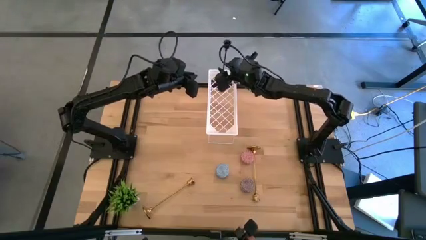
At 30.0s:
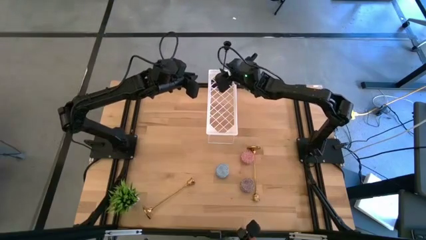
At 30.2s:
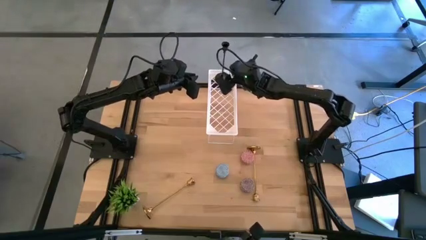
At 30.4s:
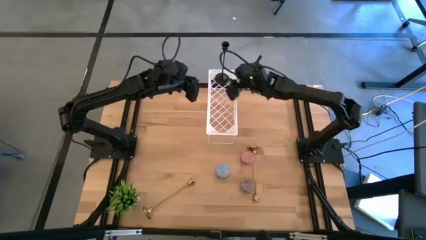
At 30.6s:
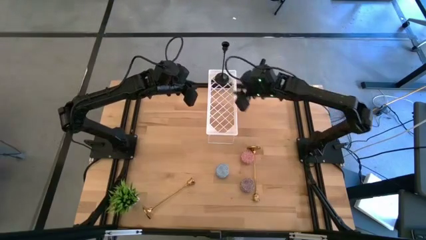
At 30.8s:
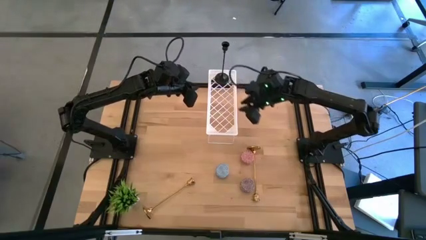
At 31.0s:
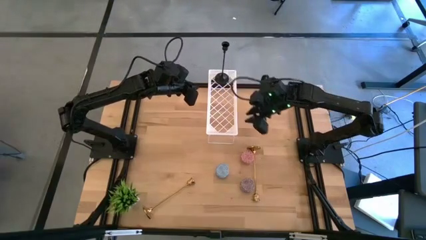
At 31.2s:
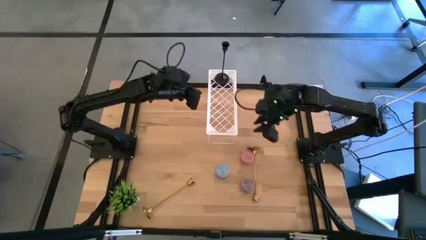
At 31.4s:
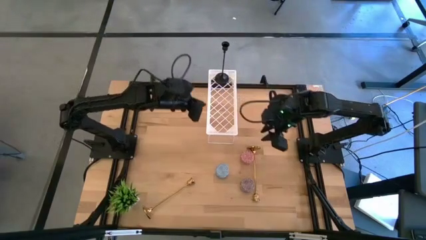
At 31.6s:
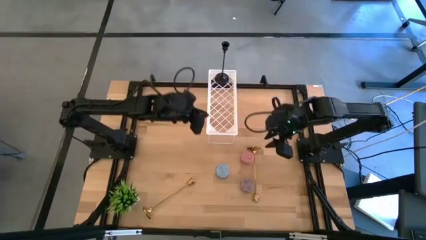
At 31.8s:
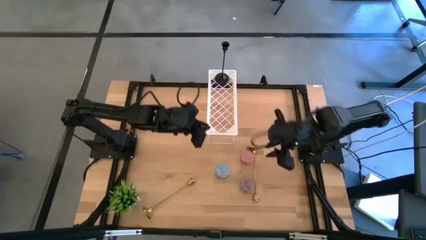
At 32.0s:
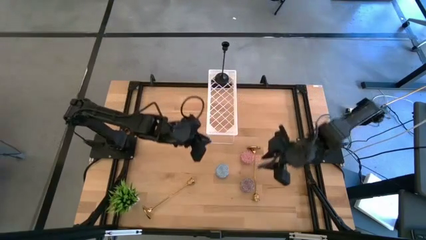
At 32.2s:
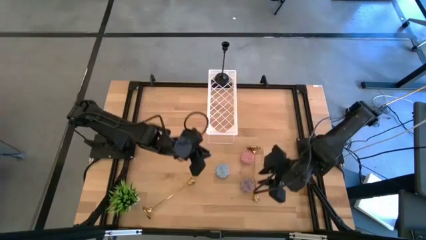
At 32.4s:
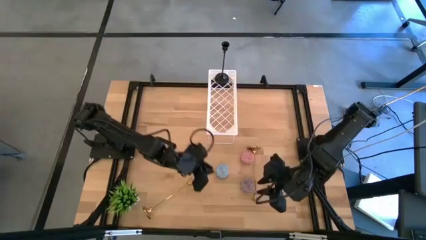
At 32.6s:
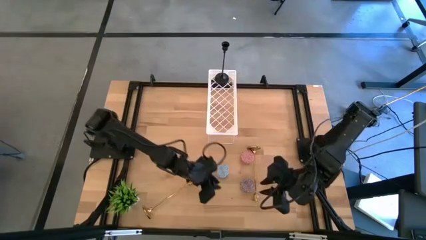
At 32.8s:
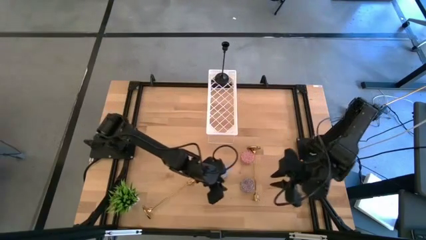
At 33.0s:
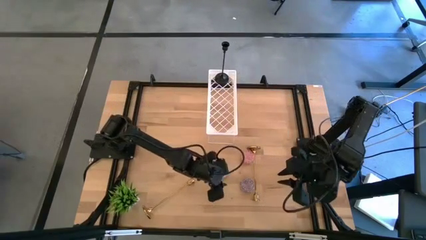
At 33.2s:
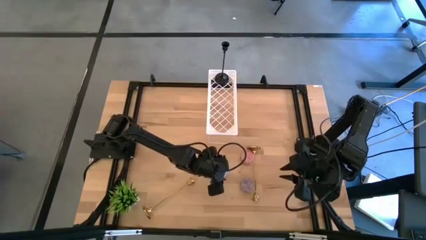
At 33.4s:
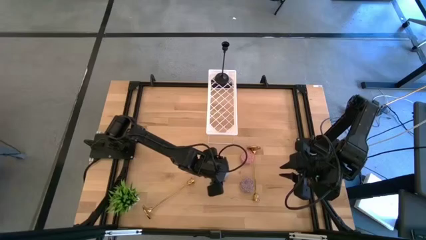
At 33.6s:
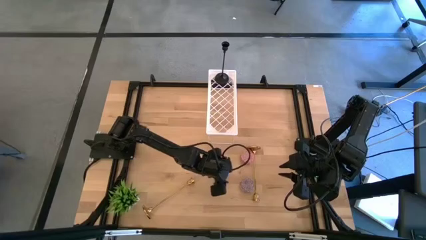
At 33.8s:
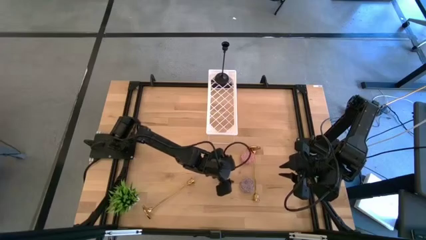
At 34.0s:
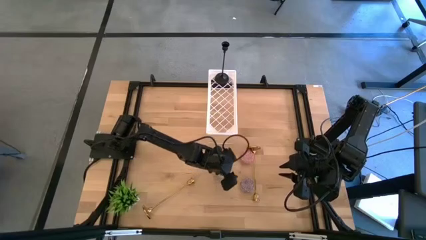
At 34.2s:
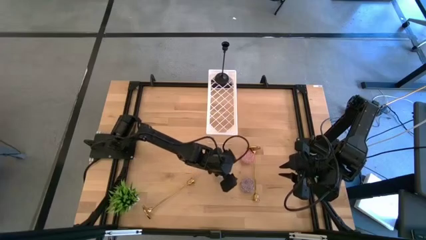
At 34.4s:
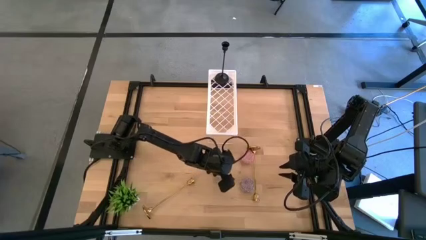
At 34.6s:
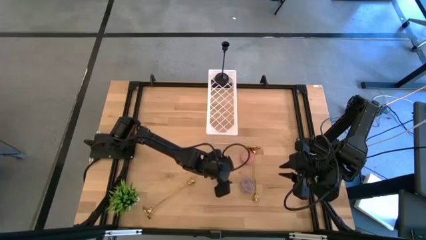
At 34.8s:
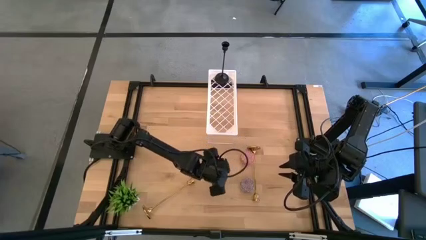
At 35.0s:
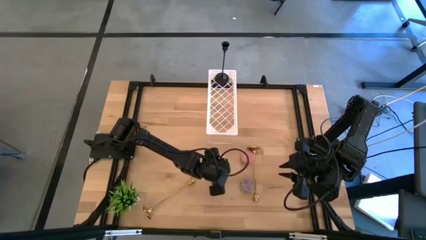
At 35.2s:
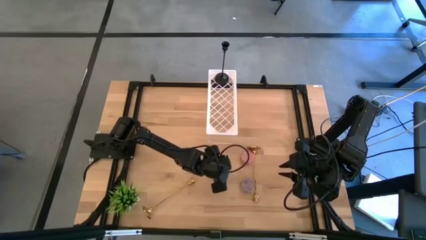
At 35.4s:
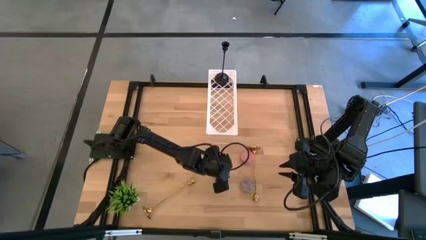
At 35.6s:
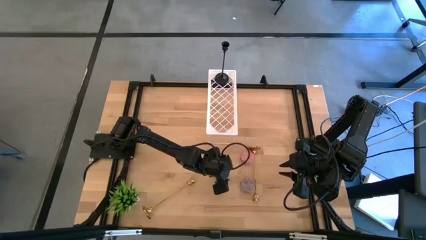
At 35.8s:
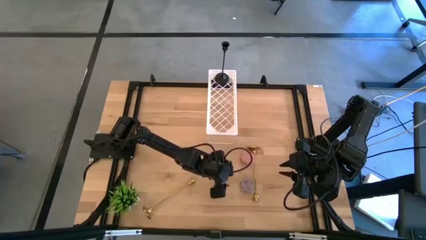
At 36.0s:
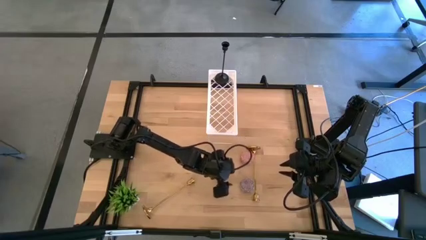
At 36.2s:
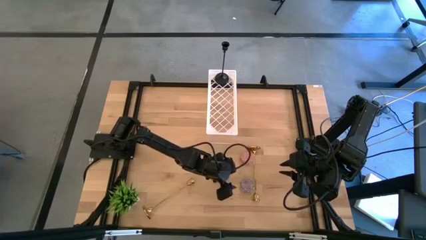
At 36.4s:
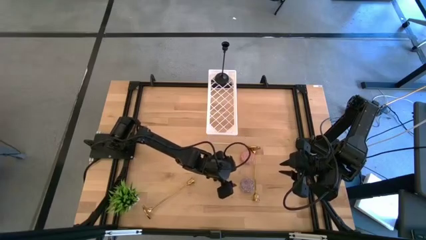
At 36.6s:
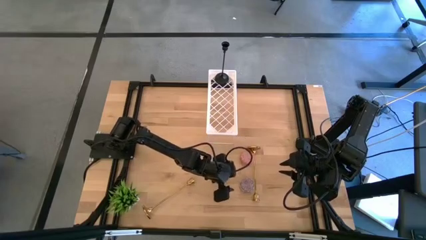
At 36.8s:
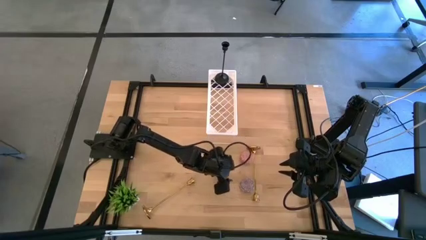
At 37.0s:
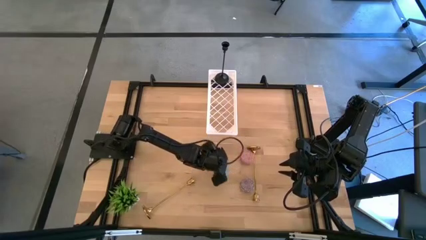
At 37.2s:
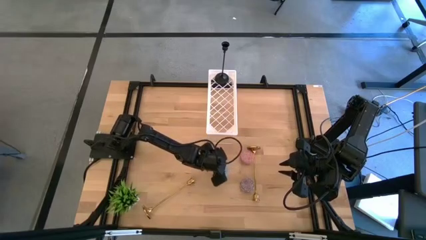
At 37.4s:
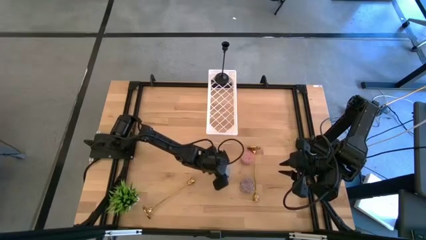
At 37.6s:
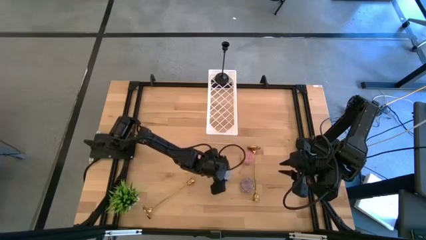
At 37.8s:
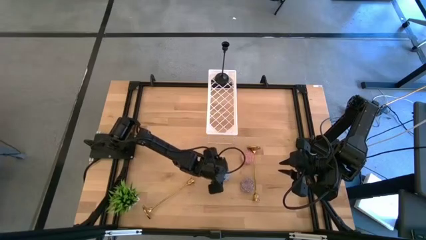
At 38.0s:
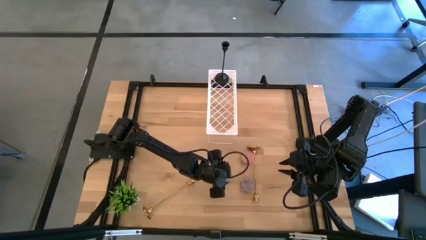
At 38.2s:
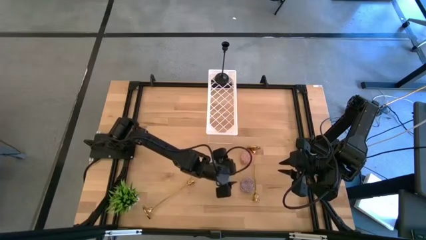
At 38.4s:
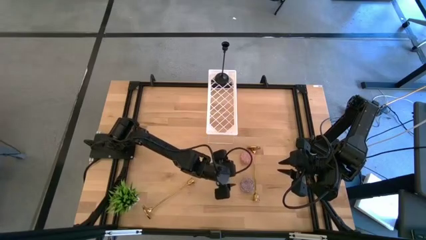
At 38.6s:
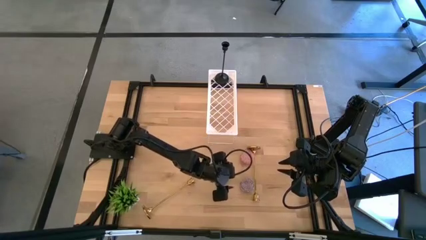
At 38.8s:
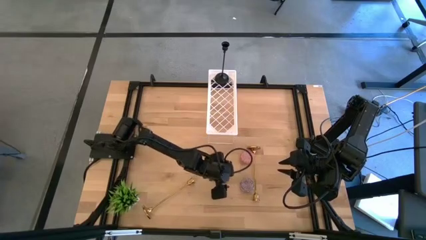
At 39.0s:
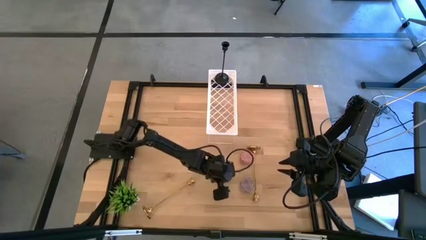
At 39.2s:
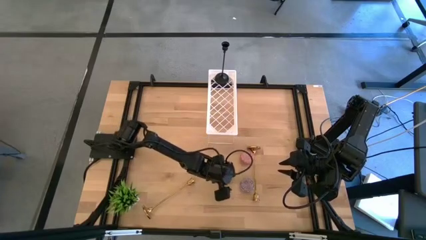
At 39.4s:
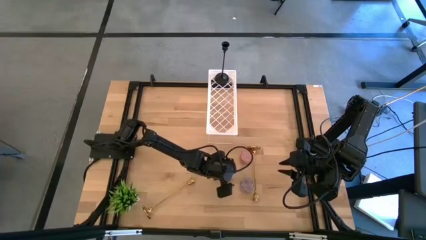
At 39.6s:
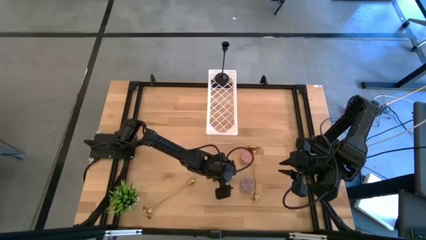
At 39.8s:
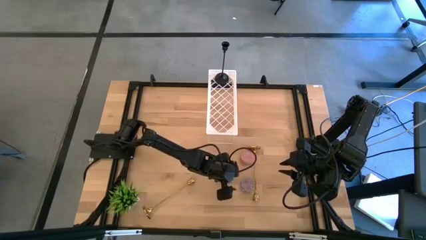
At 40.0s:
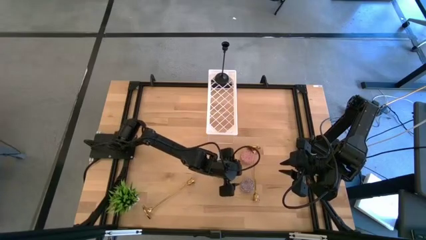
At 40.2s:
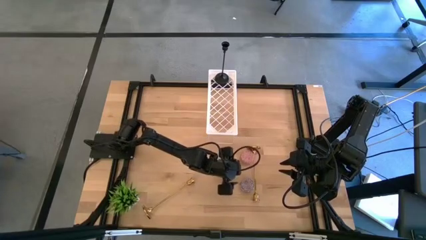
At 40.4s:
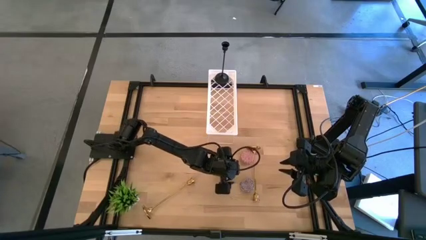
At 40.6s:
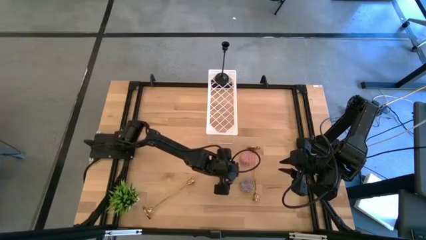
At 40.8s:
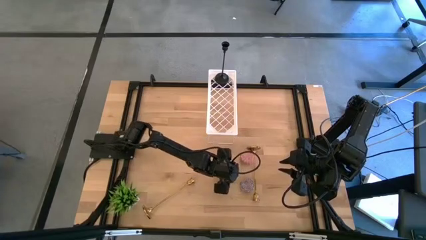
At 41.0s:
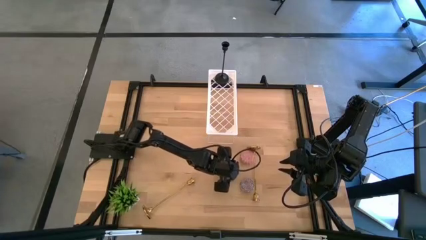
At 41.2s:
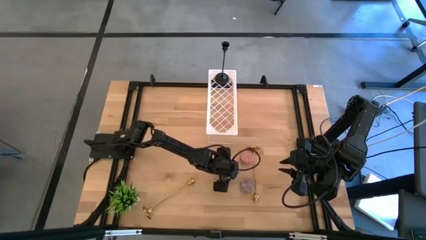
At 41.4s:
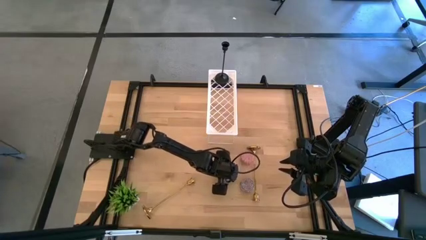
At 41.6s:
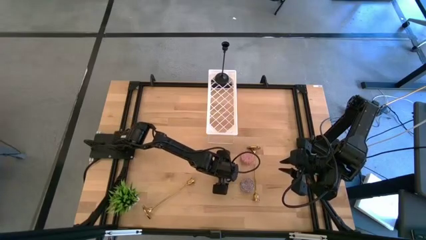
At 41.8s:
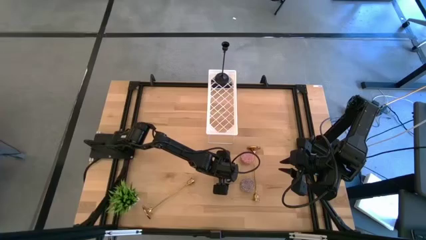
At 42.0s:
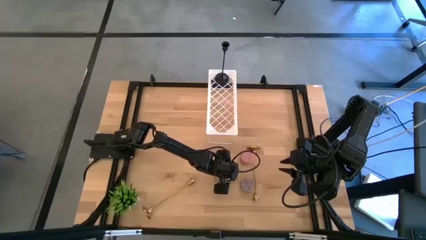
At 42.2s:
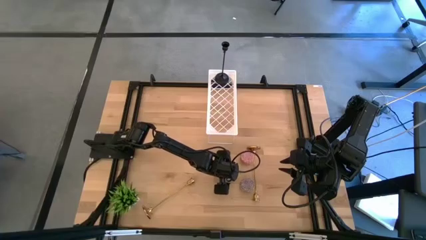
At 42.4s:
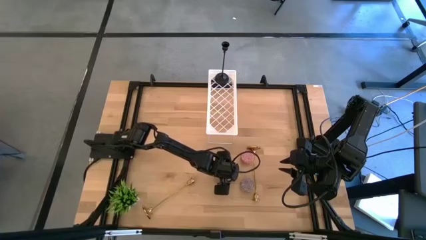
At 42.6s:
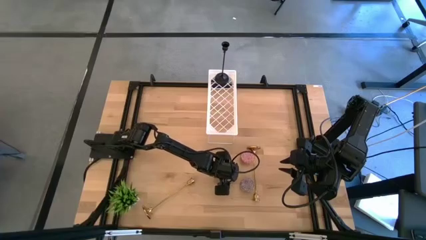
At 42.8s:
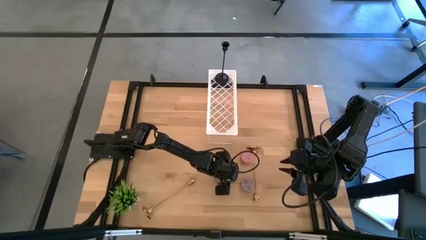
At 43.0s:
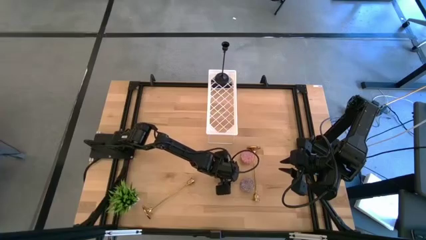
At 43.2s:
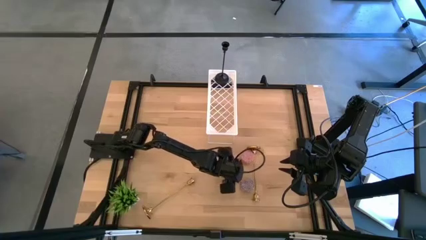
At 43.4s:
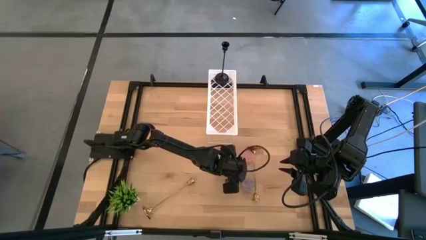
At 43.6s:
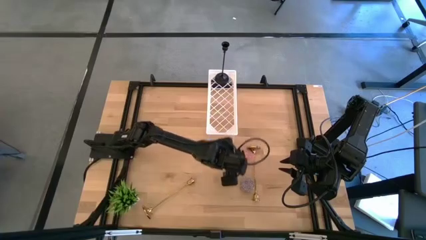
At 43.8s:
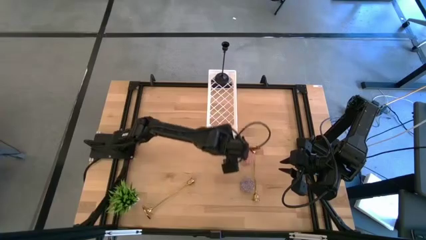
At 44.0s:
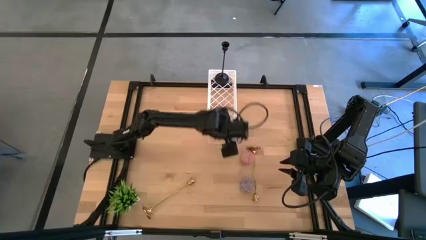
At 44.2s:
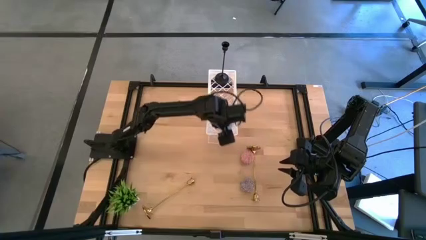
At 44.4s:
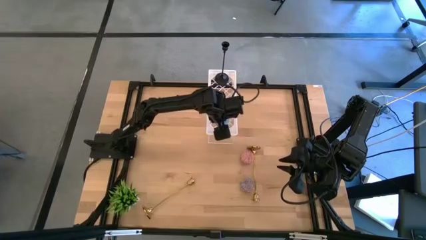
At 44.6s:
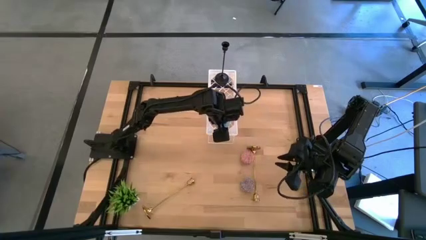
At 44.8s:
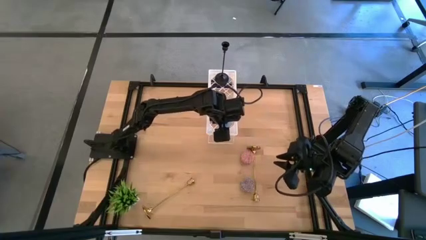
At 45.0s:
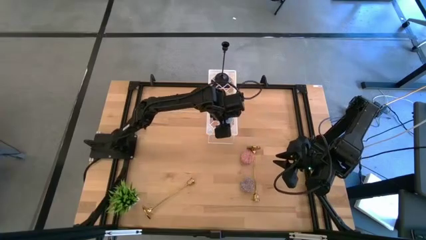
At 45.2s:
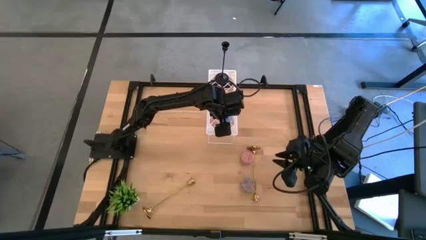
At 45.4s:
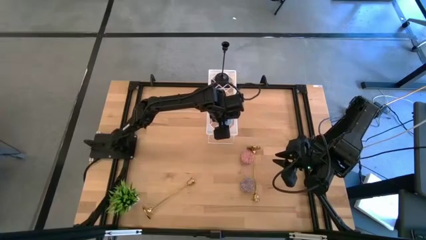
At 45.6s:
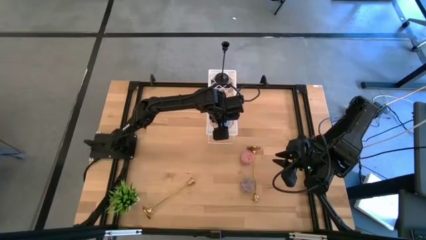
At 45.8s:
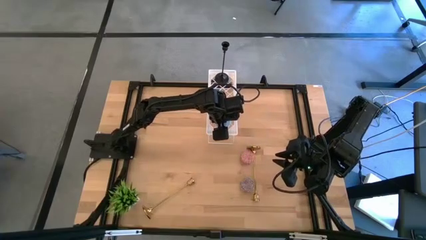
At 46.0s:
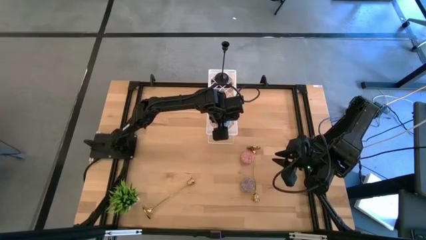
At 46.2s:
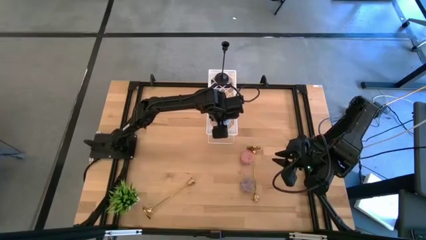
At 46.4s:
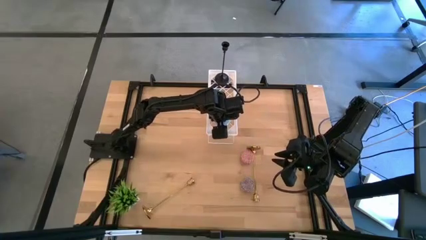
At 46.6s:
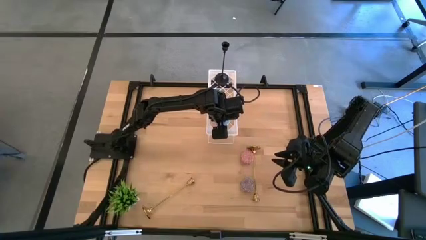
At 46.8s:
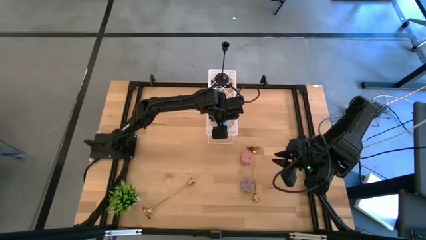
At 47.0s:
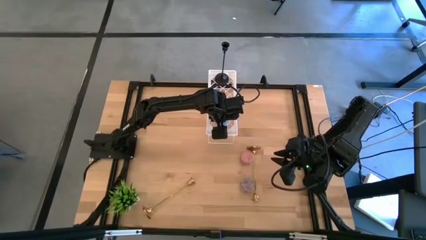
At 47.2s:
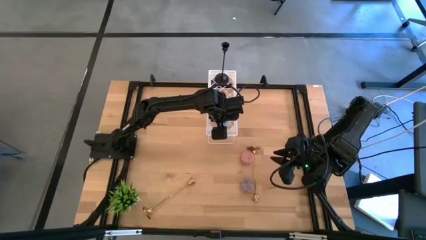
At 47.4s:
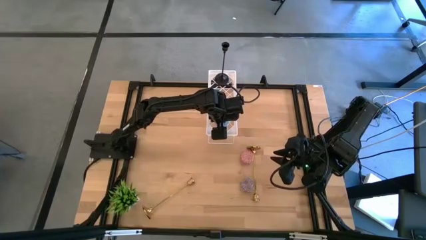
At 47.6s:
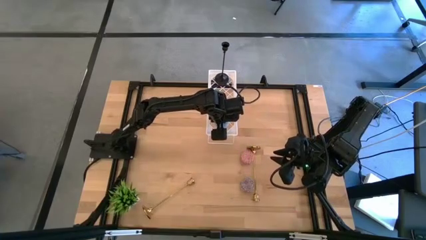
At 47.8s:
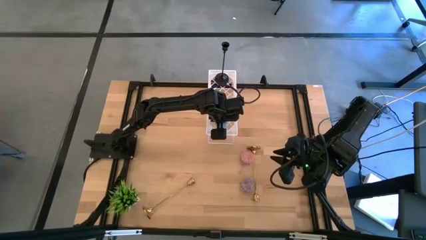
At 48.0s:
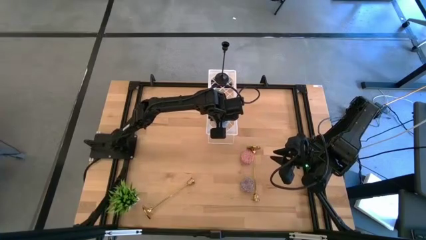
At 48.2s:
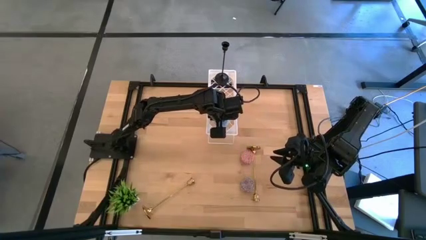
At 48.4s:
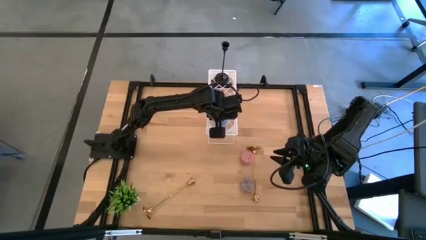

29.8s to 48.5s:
Task: Pick & Place candle stick holders
Put the blue scented candle on the shelf
